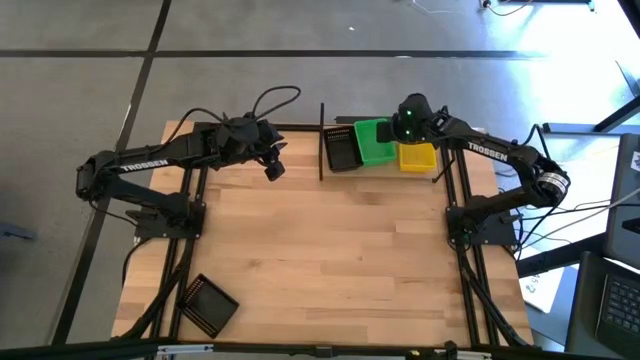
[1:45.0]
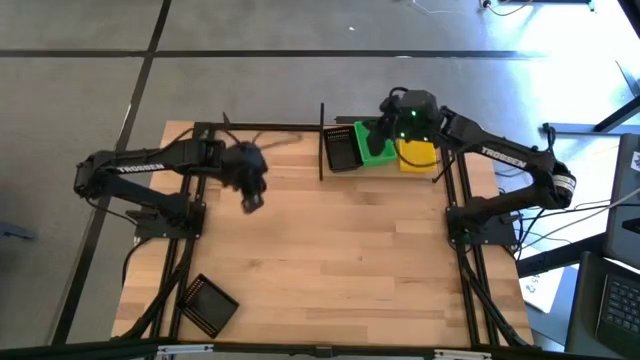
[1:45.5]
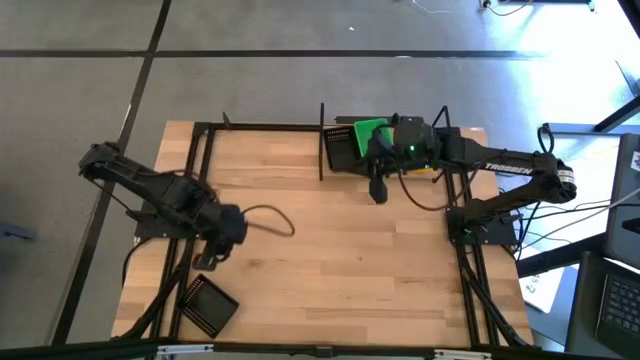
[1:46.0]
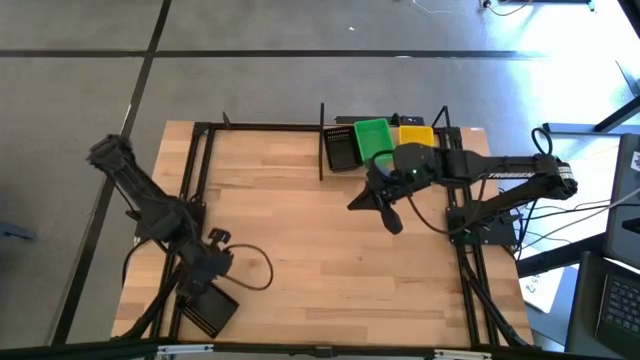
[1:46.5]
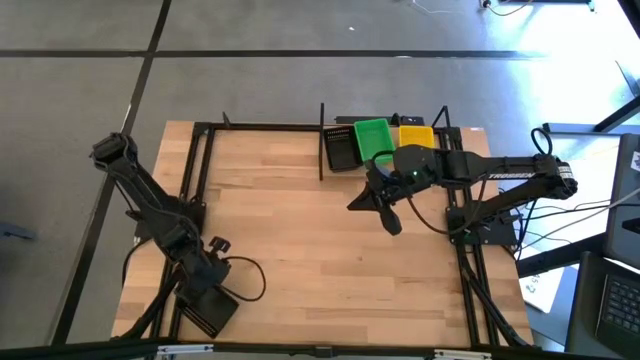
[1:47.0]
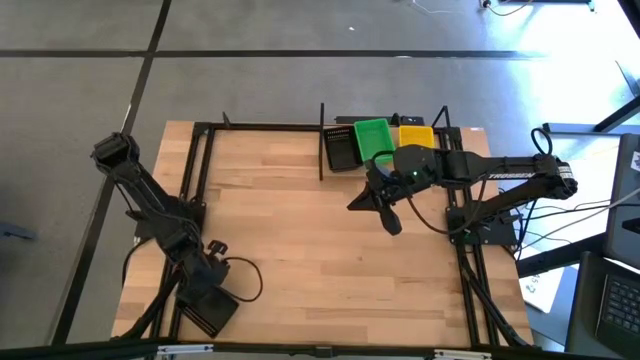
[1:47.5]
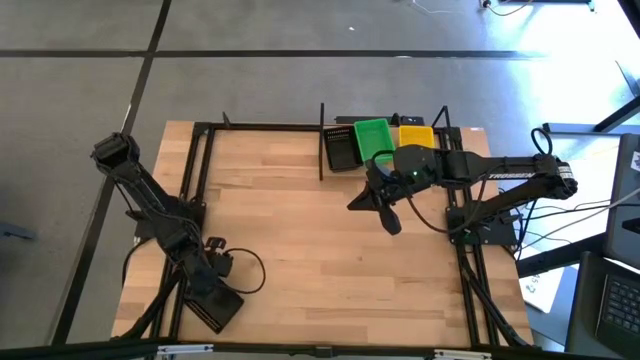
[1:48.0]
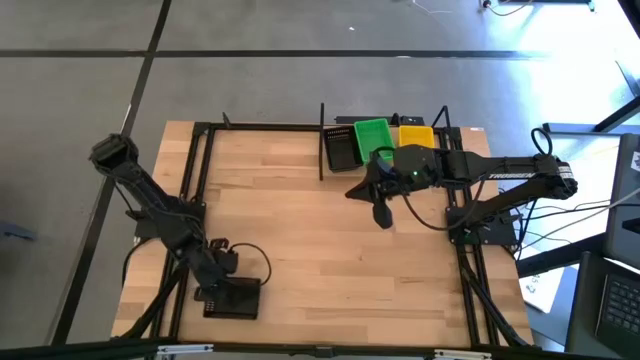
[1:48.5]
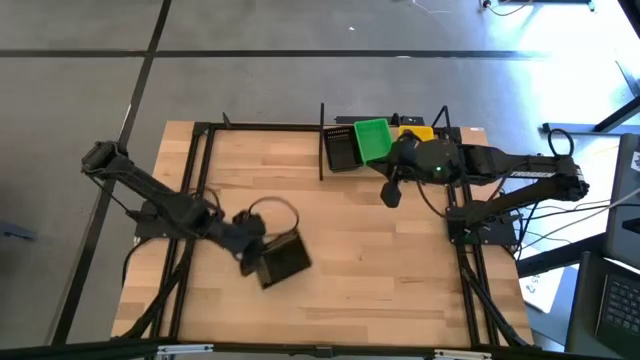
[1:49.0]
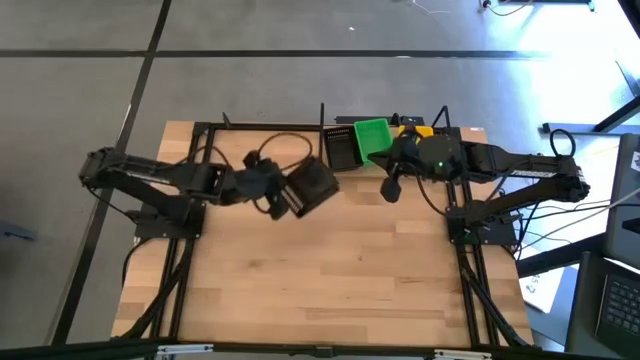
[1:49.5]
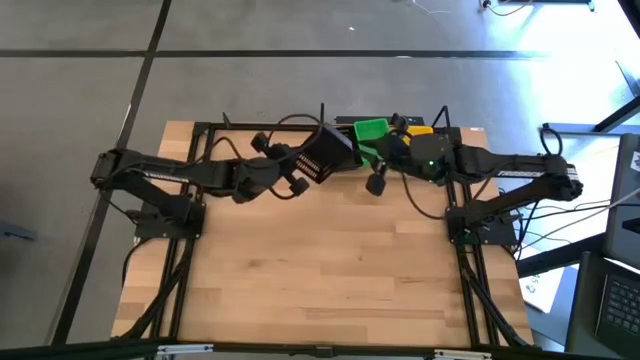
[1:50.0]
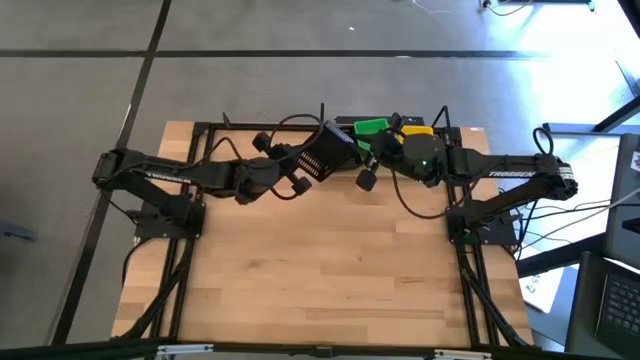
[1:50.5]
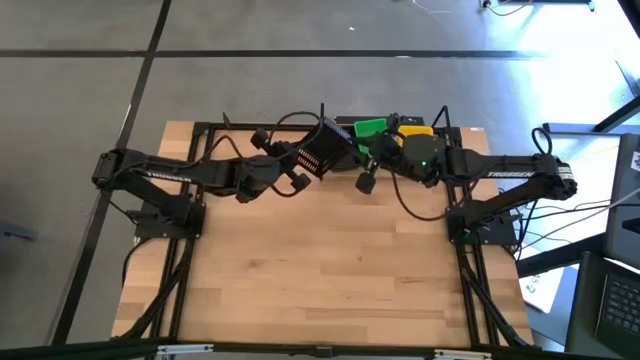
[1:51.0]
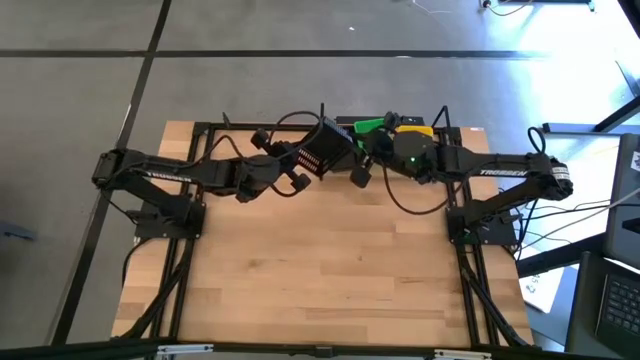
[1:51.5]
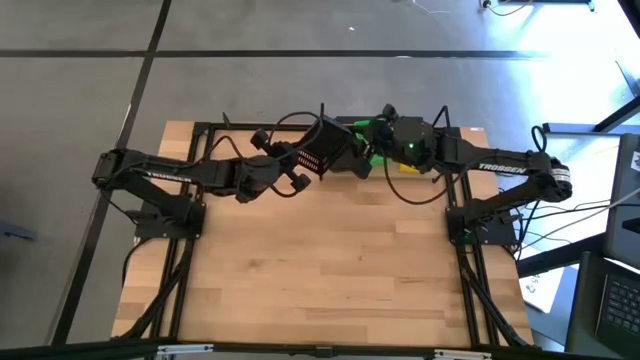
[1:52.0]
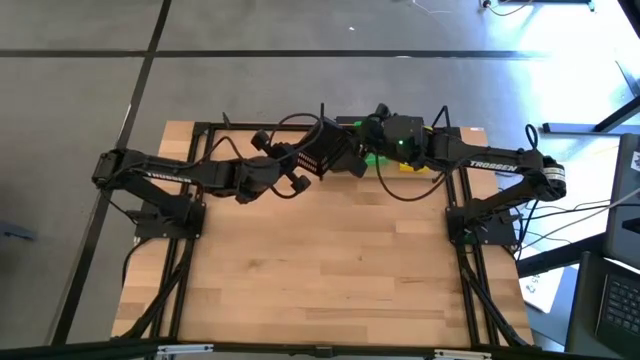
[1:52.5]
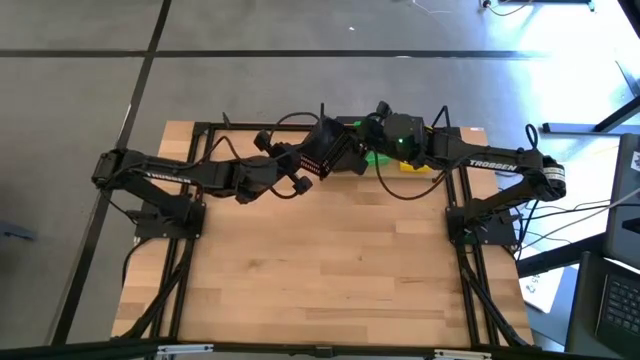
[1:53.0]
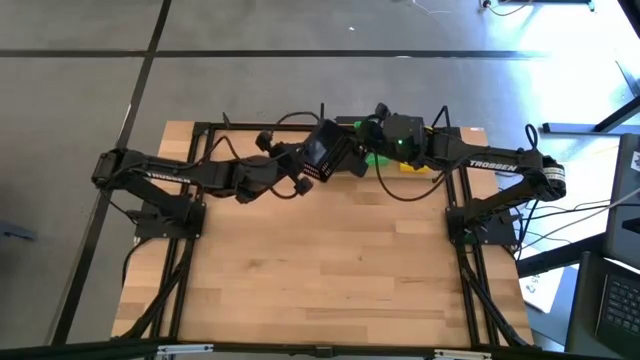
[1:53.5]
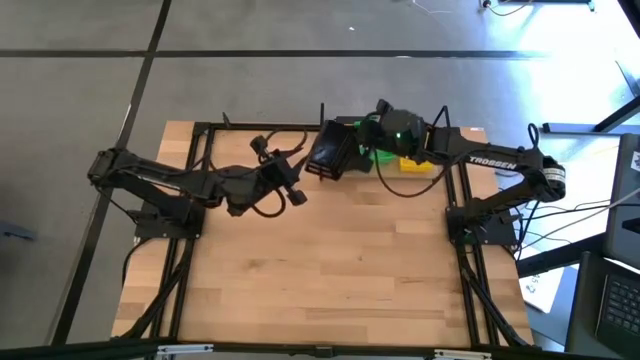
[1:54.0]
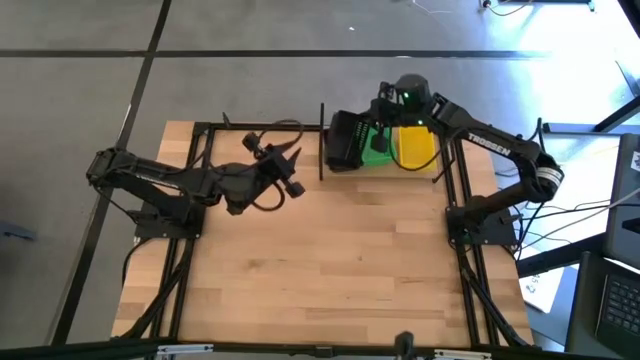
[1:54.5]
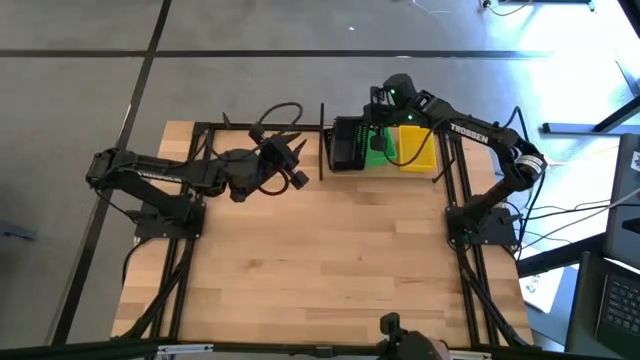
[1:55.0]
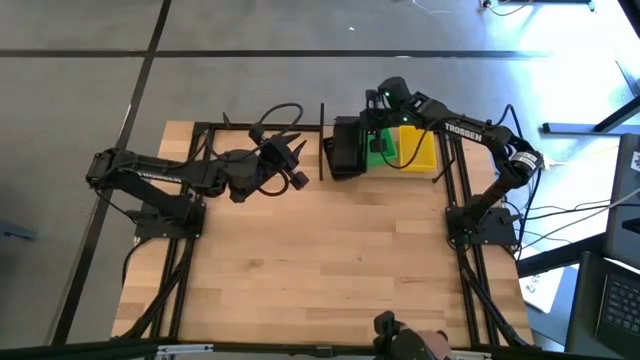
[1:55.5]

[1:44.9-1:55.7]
Task: Stack baskets on shelf by color
Stack the black basket on the black baskets on the shelf

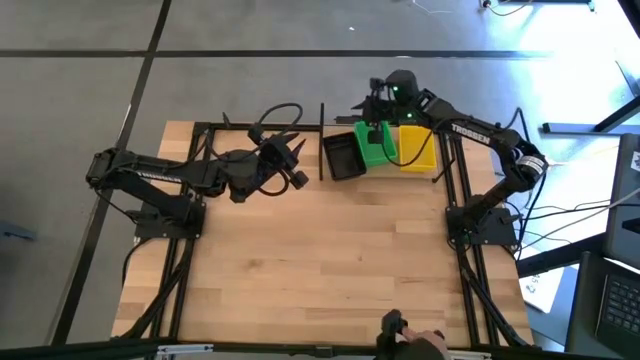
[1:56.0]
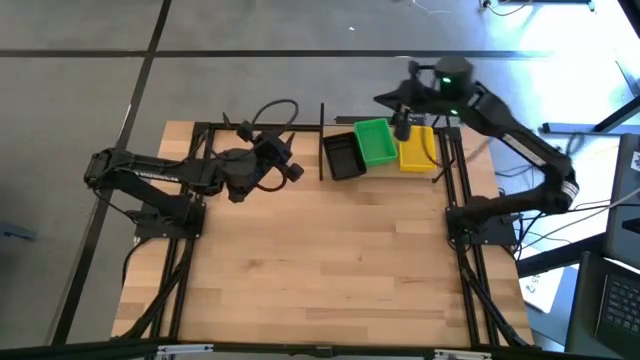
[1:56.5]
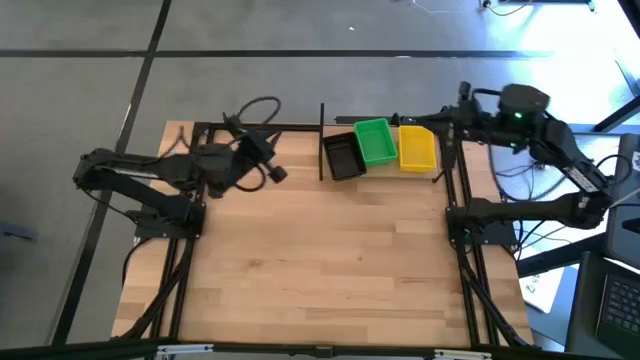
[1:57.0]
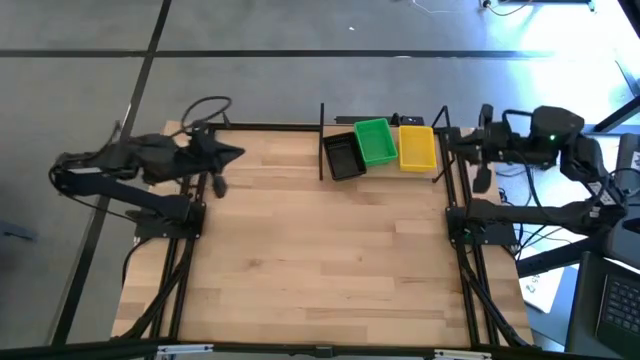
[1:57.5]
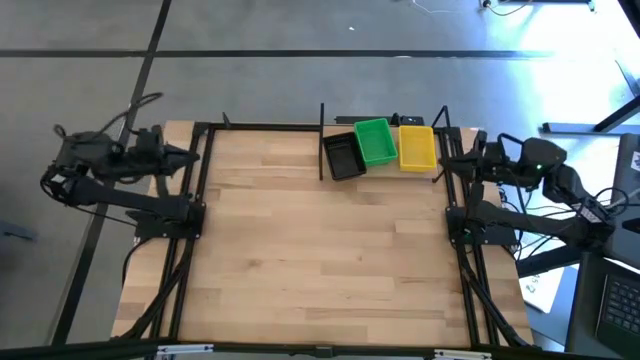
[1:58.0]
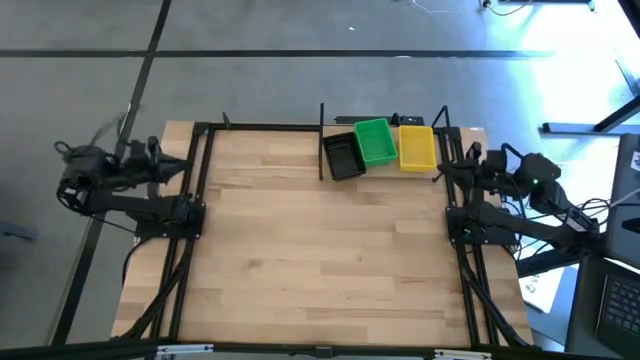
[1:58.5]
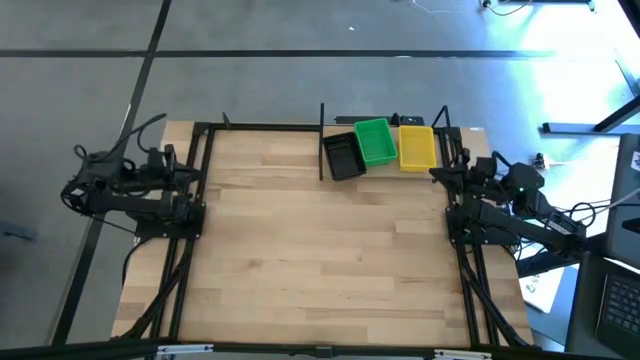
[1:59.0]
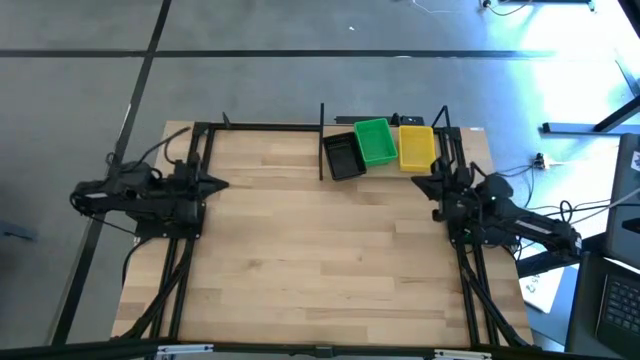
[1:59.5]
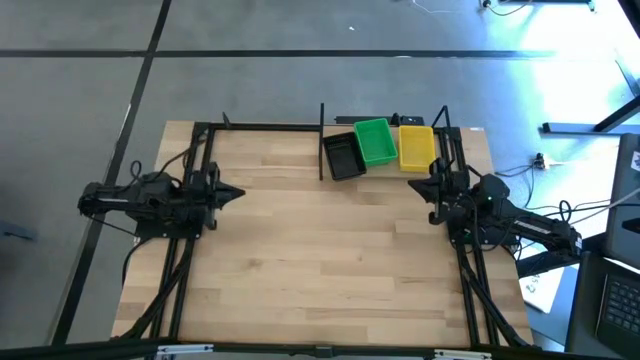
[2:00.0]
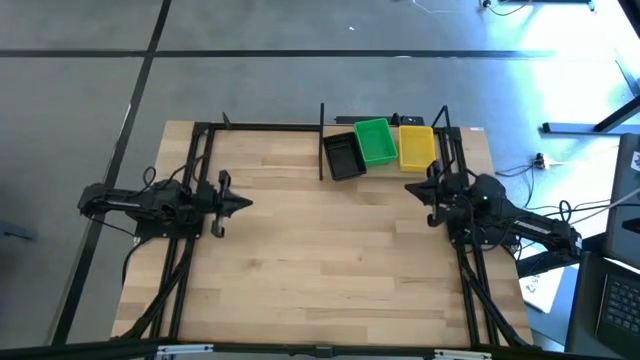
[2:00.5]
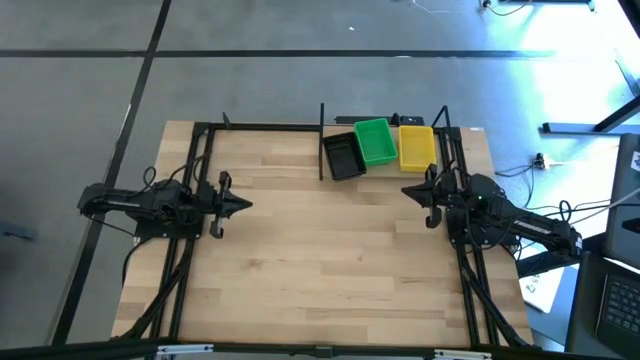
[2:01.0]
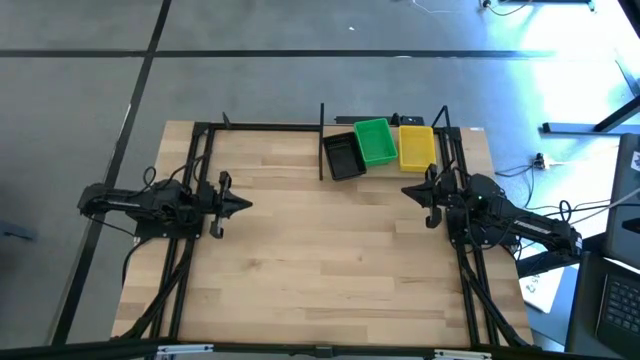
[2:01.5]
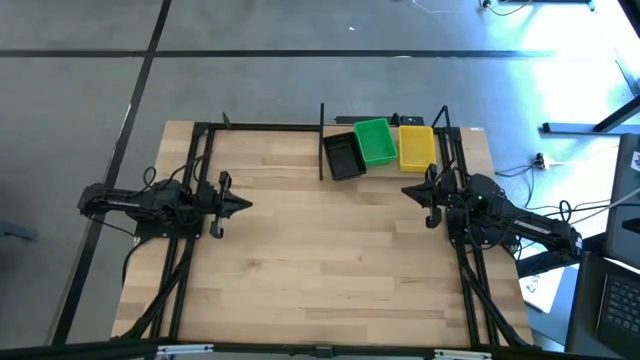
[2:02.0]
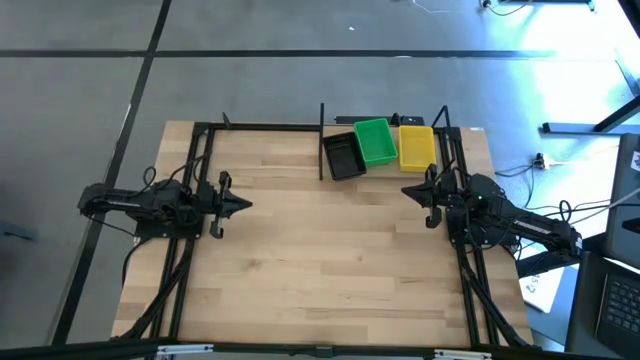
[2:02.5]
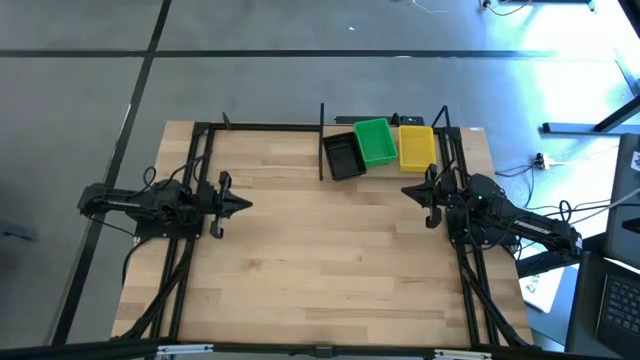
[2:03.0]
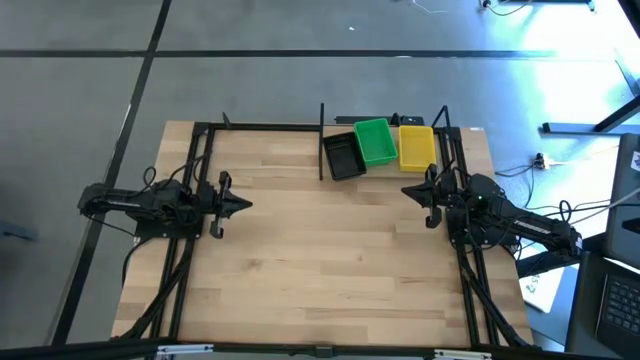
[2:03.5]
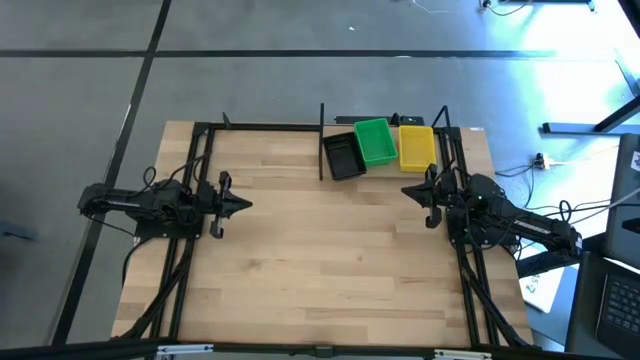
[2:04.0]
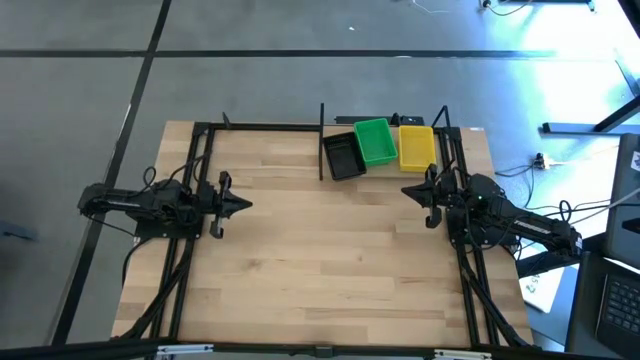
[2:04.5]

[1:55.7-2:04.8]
Return to Home Position
